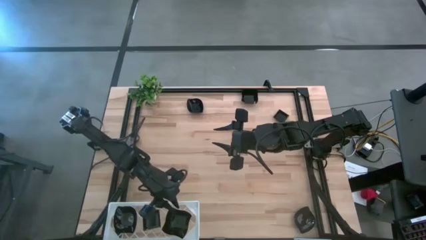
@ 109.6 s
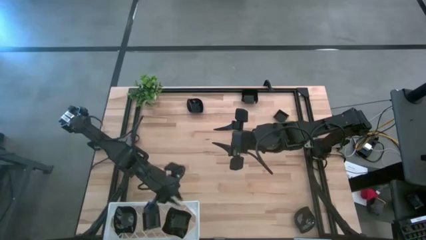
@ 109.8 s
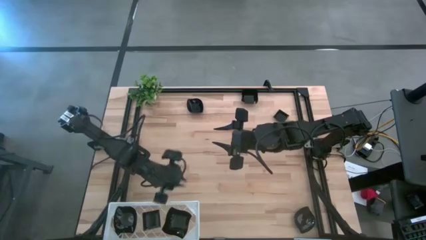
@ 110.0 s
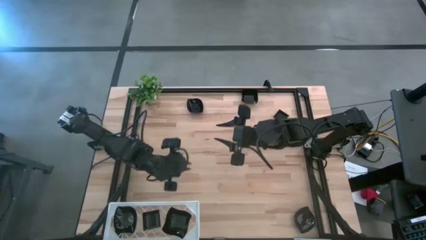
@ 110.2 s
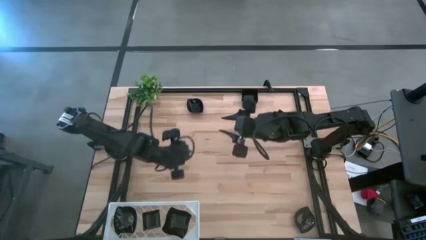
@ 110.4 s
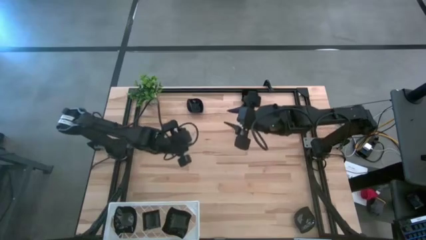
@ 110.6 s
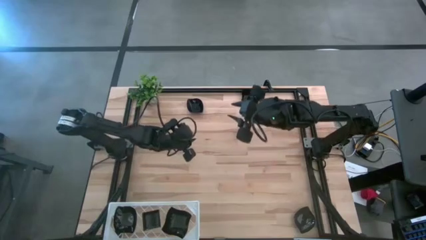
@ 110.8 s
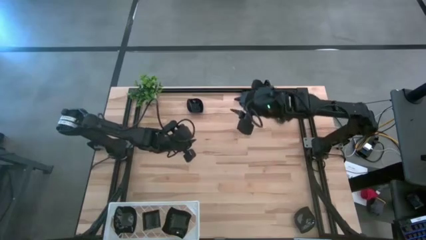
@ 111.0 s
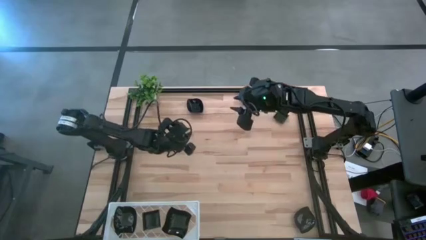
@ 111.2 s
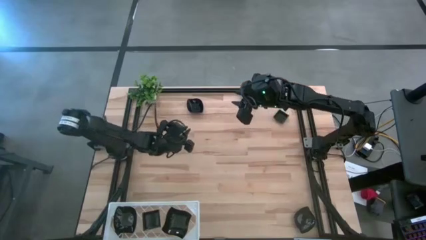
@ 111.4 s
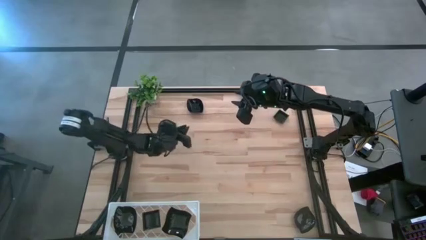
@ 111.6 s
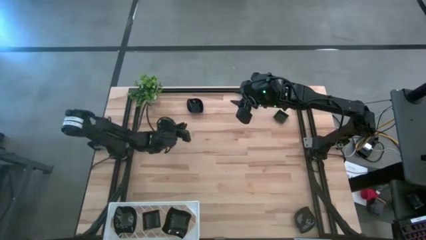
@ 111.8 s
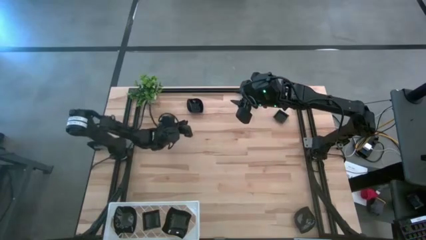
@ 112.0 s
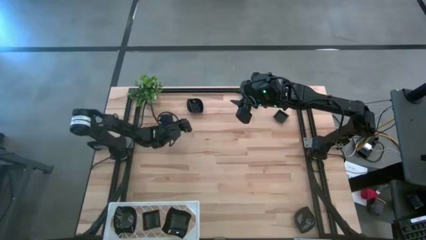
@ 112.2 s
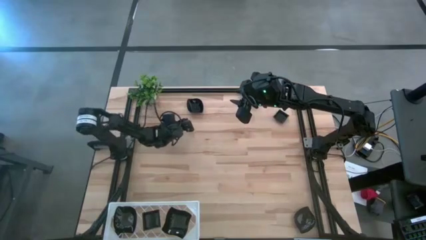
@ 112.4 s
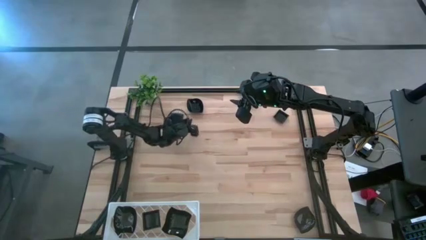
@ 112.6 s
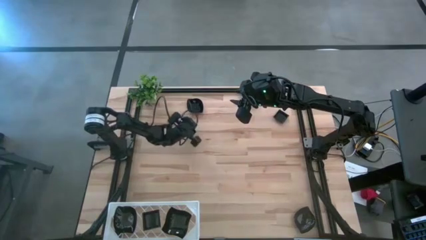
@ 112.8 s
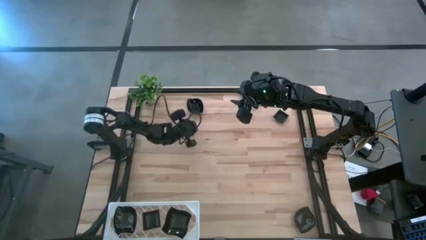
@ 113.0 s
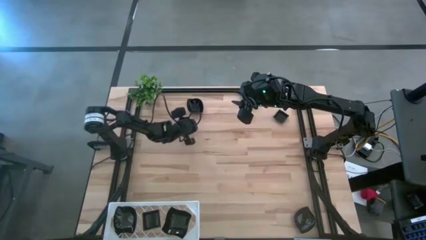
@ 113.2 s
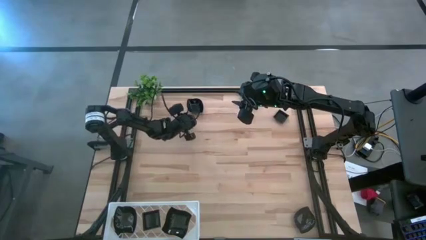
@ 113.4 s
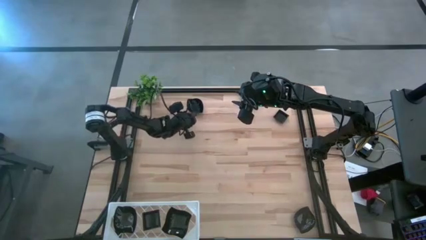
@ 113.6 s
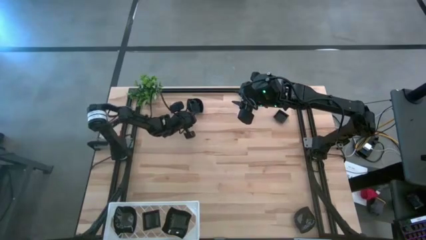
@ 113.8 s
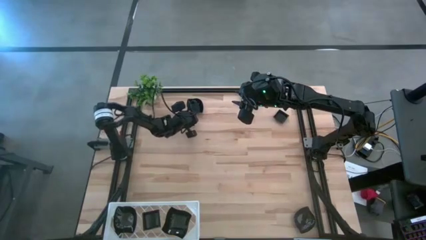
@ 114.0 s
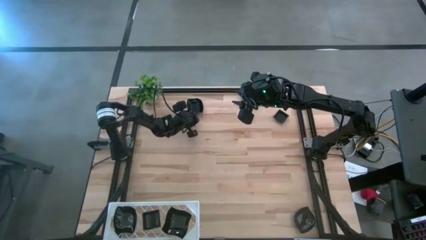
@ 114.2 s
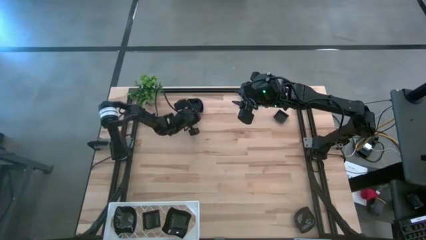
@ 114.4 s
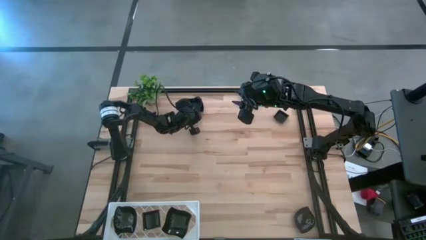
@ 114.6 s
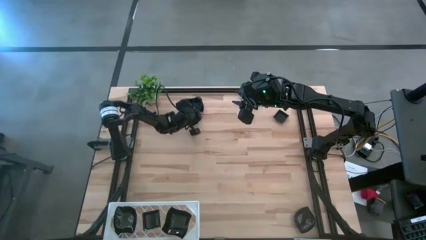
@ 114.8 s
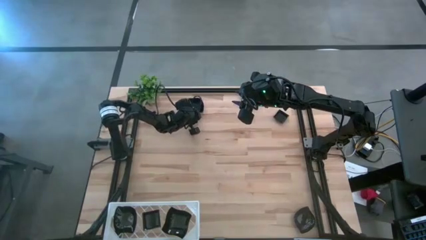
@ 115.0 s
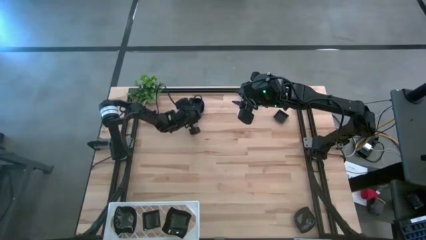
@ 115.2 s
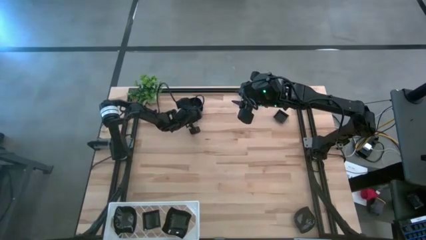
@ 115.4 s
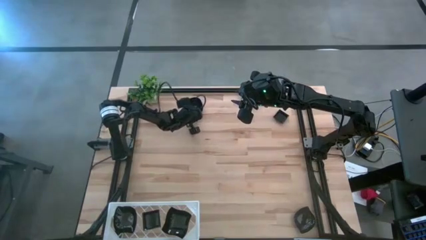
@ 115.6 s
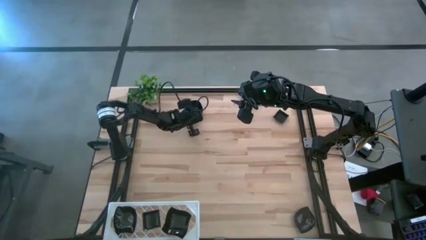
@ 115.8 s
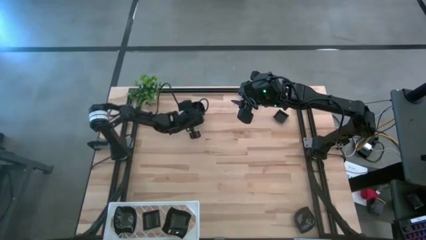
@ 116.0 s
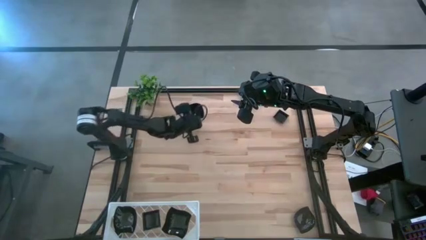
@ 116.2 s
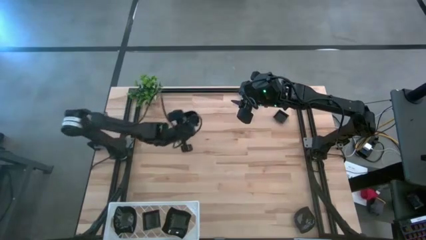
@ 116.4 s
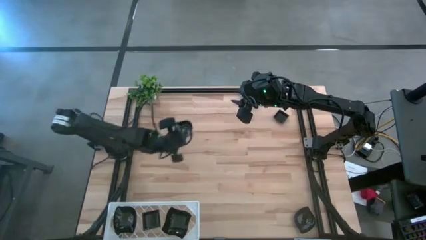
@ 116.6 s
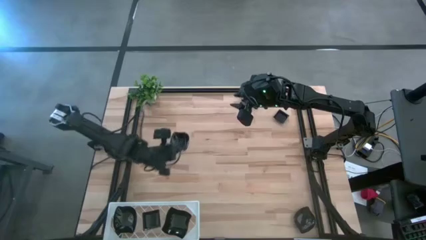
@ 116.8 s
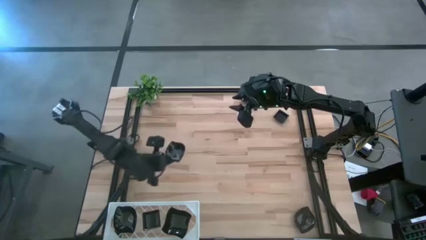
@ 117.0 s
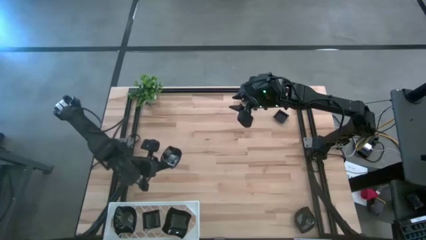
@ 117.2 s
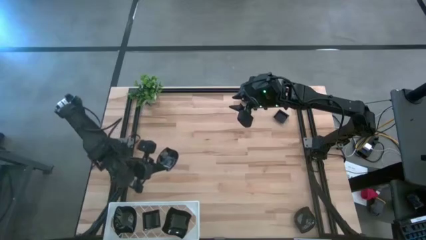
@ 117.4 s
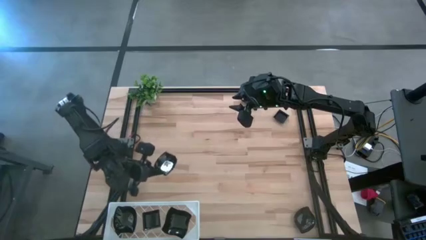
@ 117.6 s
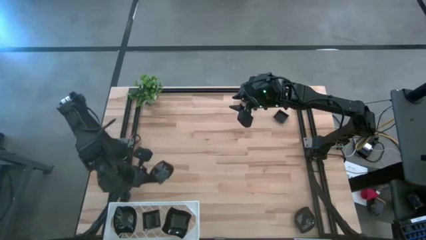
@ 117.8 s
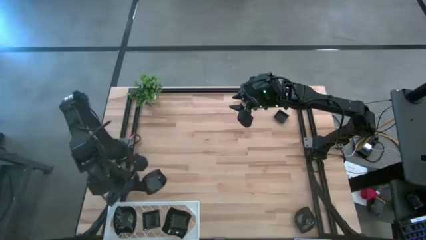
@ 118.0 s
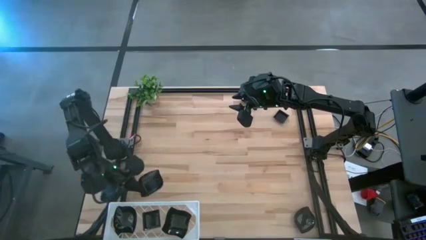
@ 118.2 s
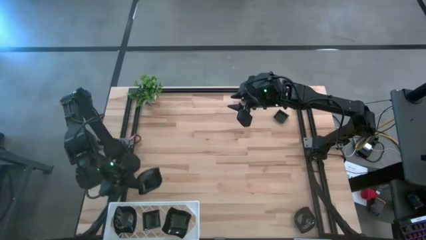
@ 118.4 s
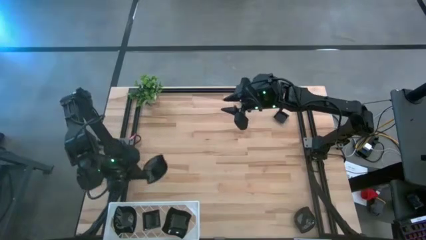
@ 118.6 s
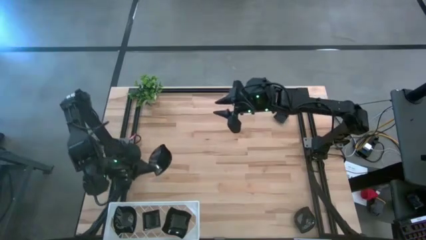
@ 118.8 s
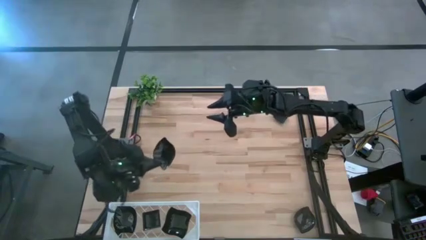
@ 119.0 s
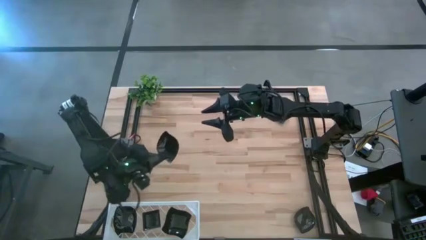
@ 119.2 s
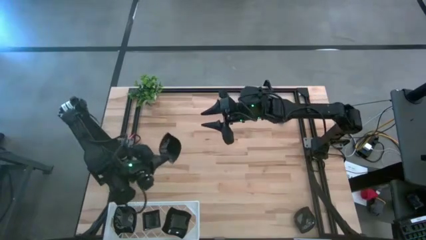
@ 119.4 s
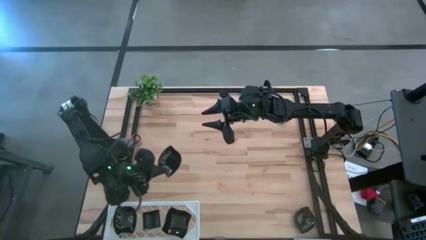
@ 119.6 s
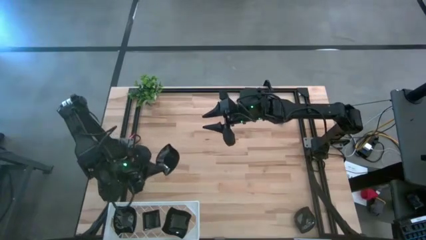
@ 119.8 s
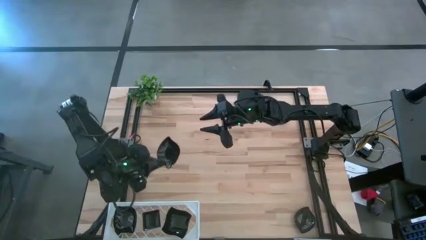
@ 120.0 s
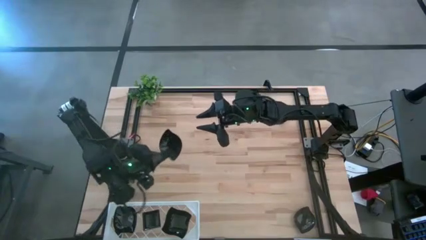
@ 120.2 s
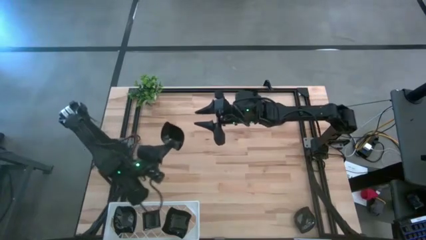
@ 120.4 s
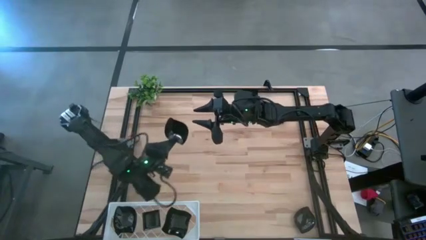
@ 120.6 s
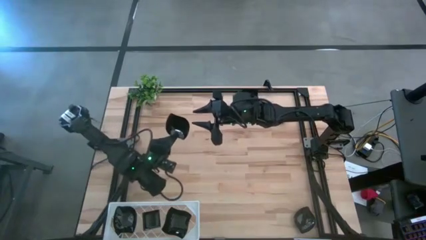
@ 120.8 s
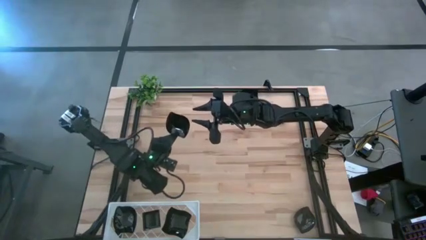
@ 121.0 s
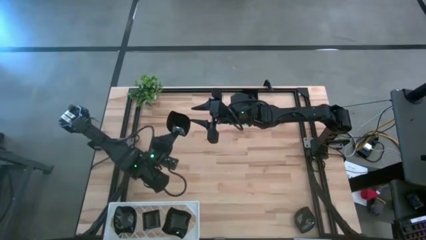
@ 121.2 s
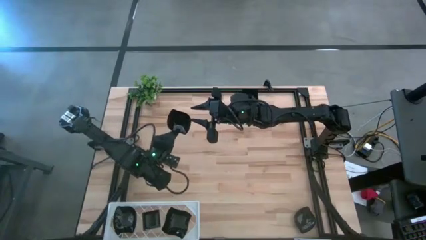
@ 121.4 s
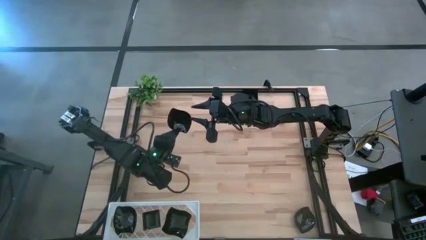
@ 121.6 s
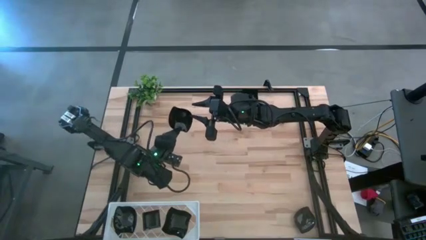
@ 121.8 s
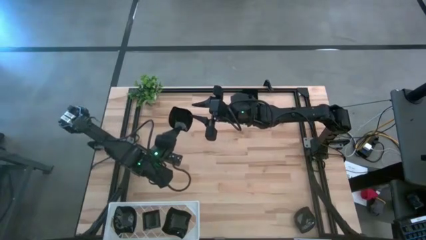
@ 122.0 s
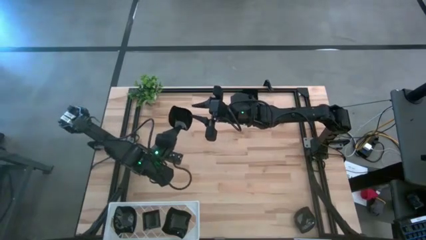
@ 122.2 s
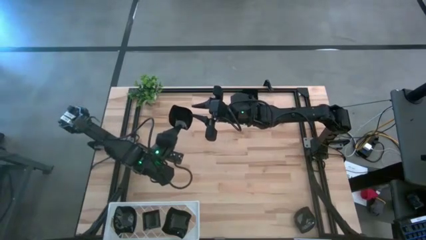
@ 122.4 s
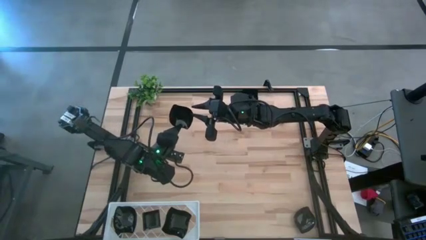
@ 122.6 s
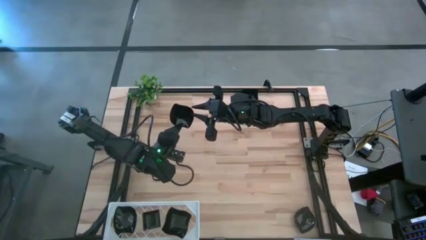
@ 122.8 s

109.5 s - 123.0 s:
Task: Pick & Place Mini shaped plates
Stack the black leaf shaped plate on top of the other black leaf shaped plates on the shelf
